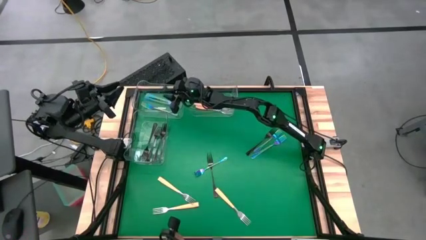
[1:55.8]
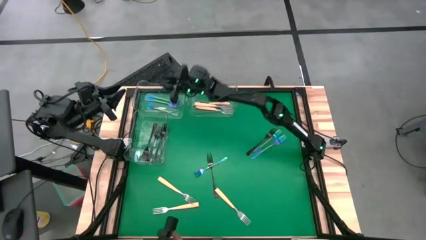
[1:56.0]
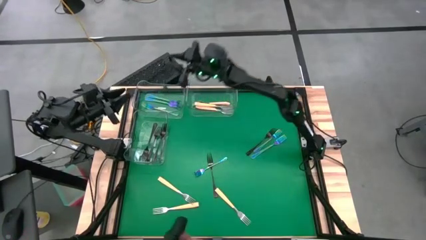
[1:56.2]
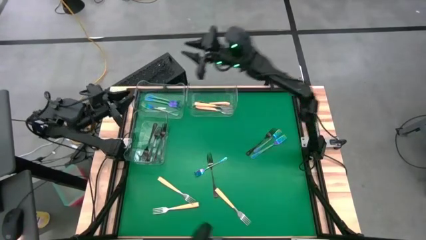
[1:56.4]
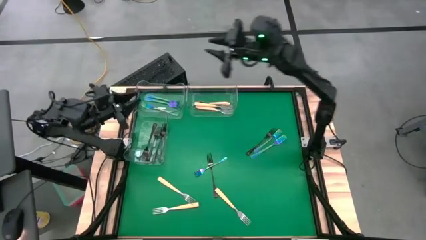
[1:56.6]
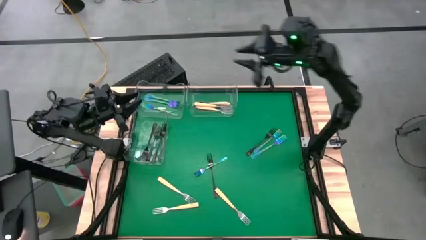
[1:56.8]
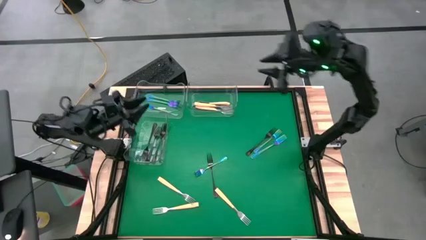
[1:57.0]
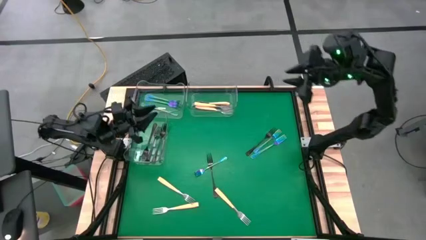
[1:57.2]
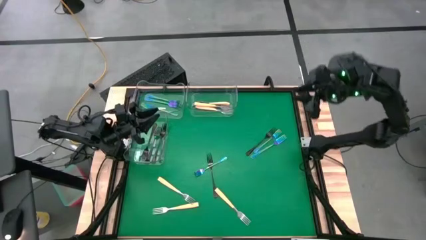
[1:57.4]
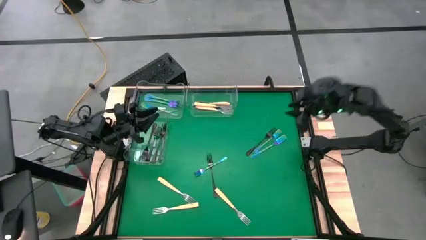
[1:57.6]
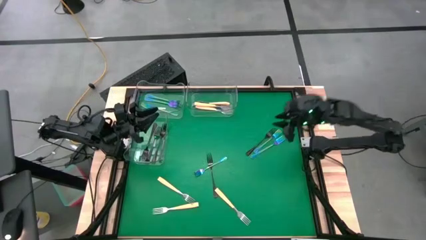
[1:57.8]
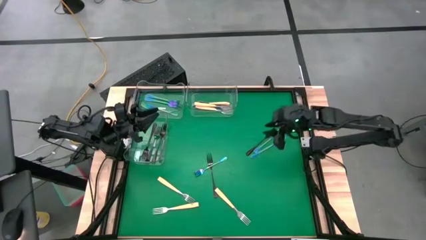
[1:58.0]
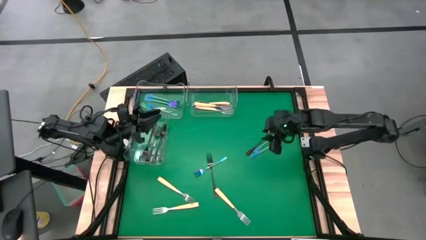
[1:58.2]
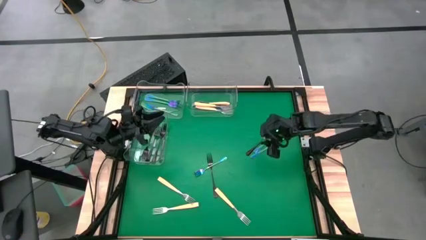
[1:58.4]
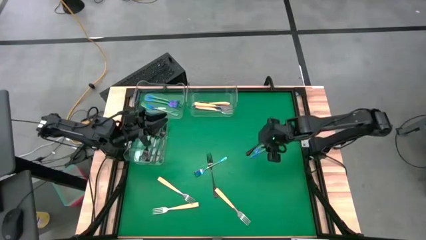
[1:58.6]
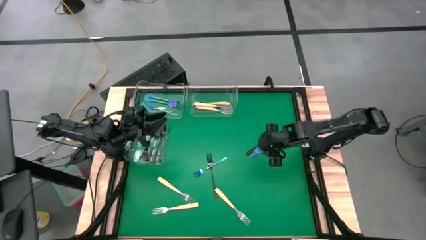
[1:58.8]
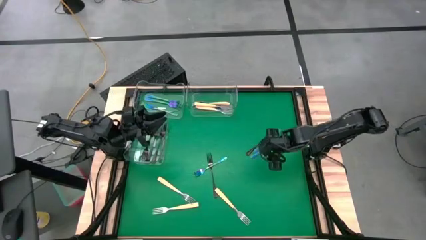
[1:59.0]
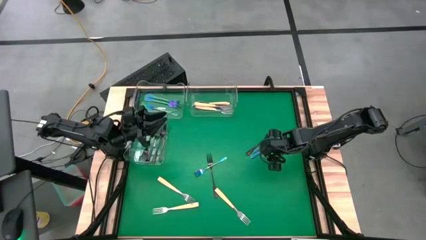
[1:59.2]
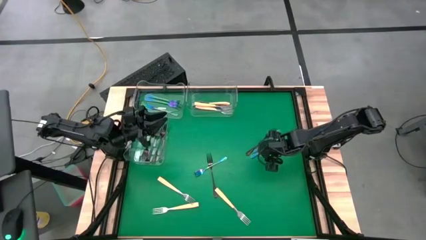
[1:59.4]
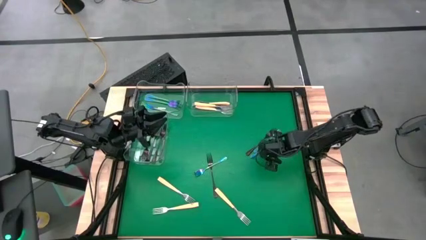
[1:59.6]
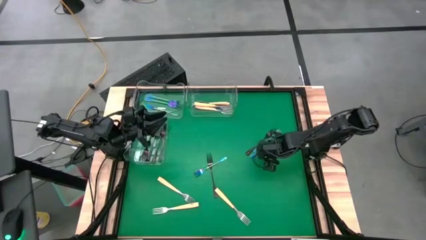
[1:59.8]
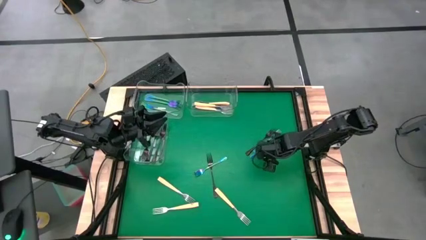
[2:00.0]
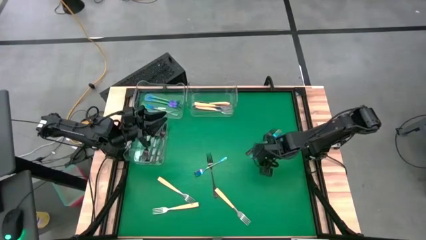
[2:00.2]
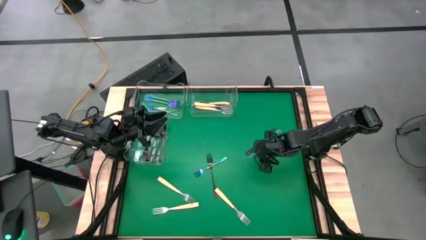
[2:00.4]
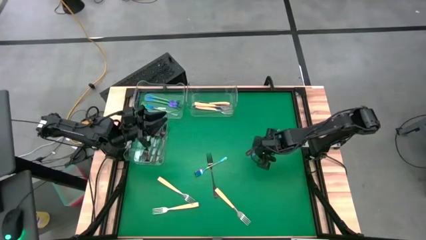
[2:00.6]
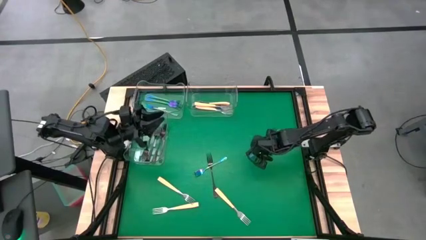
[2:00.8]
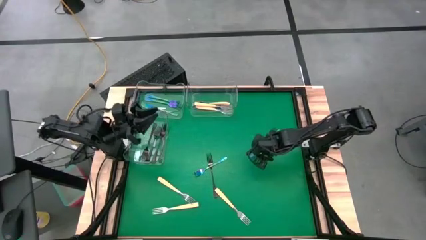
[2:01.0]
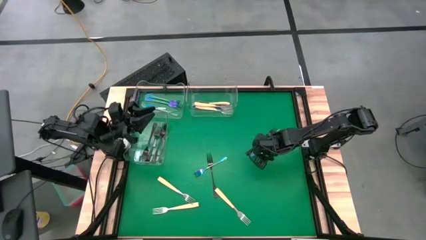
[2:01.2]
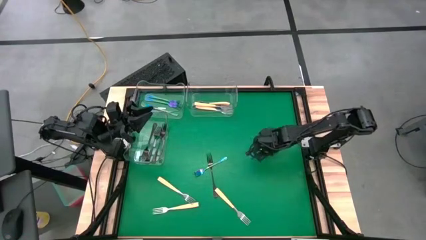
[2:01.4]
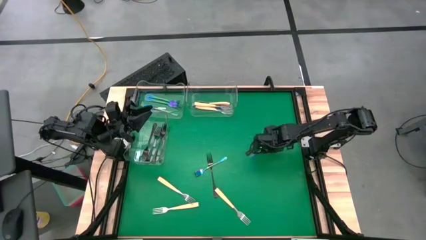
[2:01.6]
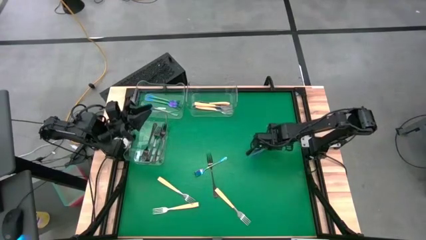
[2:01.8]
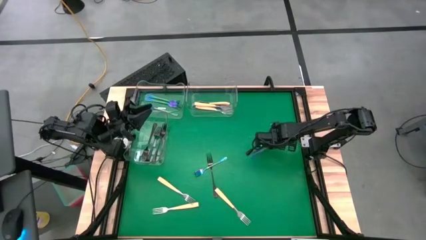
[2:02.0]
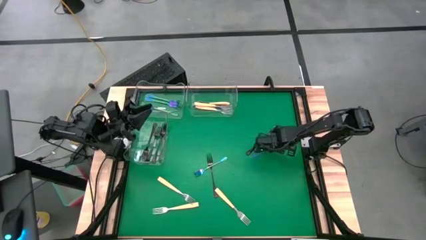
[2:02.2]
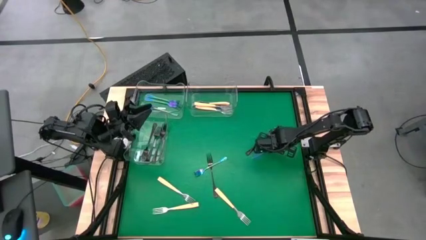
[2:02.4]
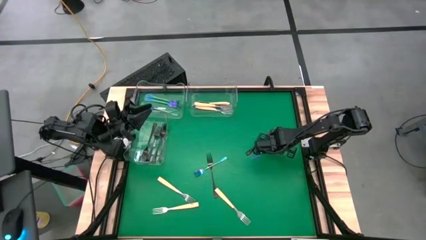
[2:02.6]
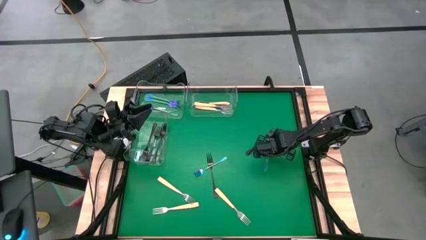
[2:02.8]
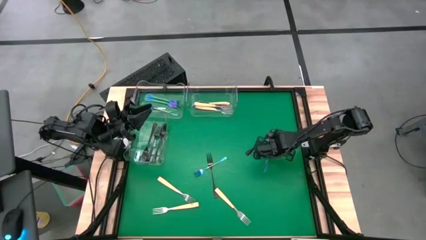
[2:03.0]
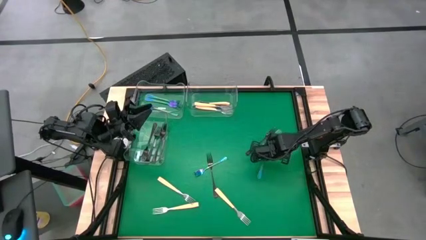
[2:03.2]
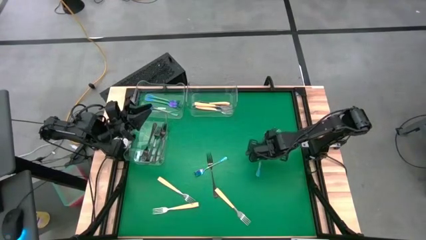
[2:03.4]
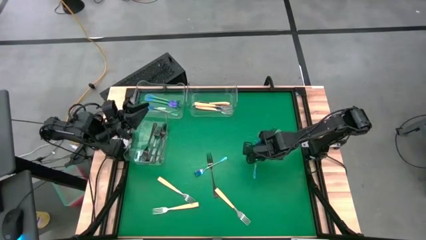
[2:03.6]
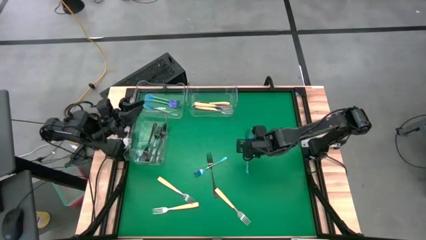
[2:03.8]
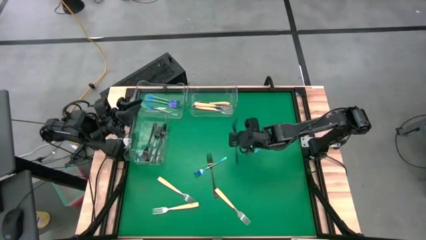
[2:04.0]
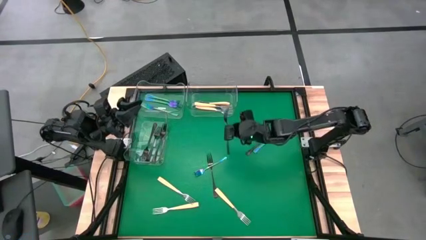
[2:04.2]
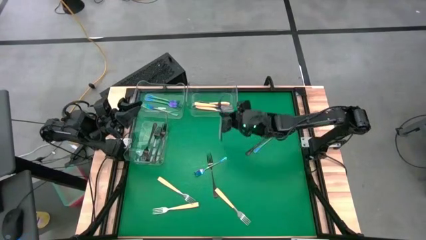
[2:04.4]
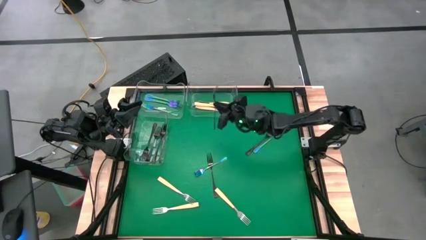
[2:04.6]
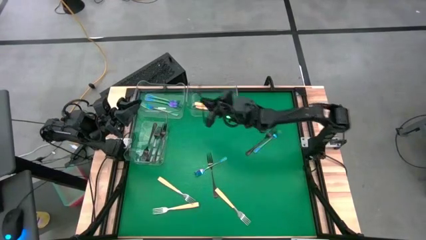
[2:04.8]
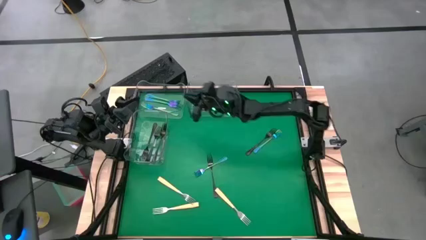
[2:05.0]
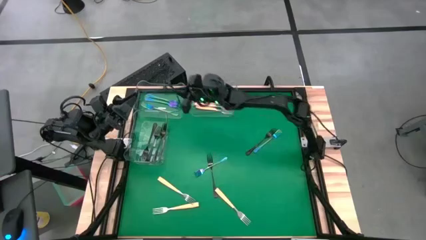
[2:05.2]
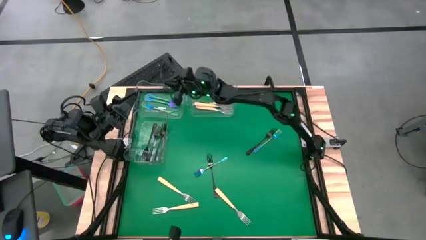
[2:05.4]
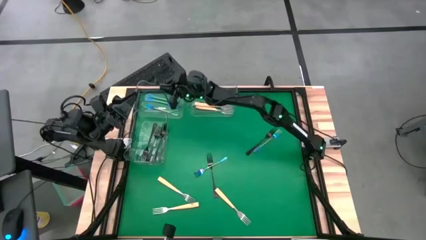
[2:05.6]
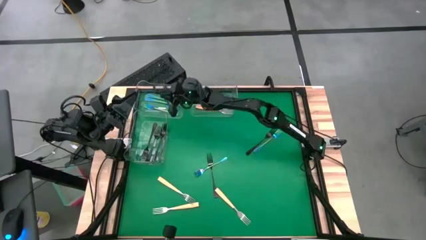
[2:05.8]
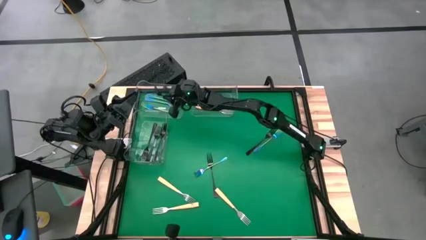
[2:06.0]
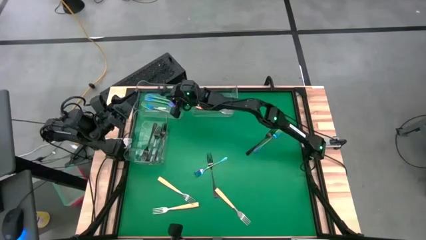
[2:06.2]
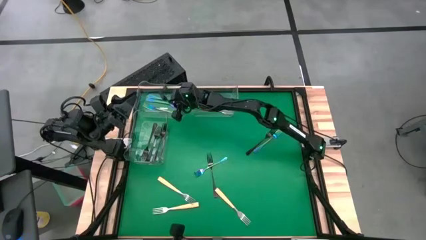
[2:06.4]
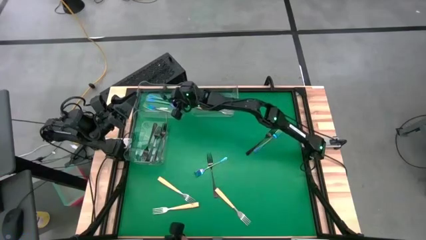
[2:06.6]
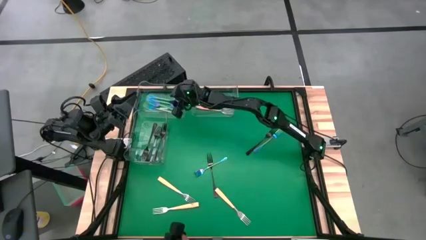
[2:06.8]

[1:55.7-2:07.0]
Task: Sort silverware by color (type)
Put the iridescent fork into the top left transparent bin
